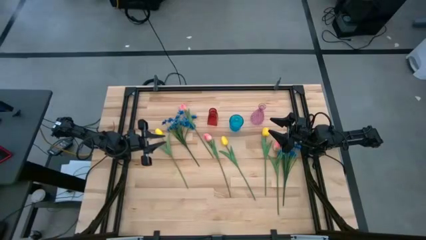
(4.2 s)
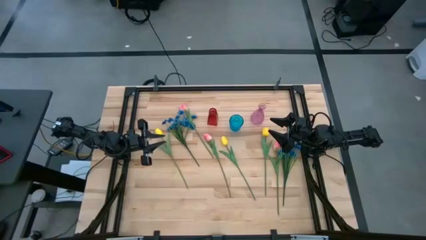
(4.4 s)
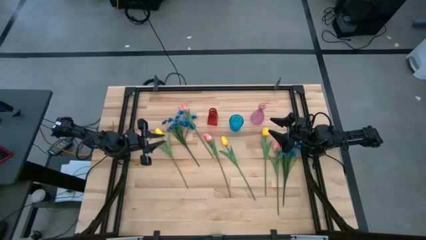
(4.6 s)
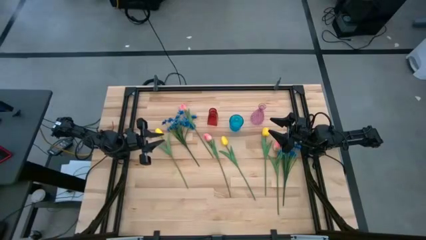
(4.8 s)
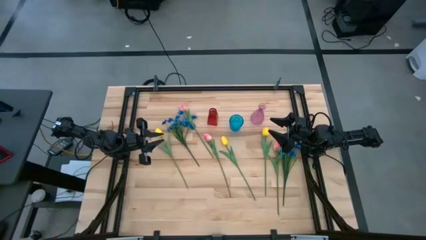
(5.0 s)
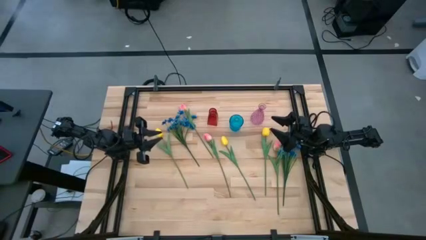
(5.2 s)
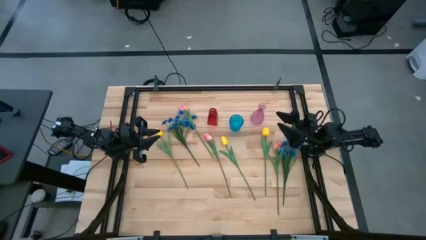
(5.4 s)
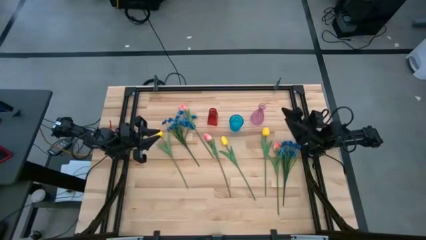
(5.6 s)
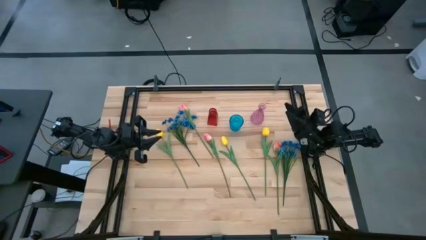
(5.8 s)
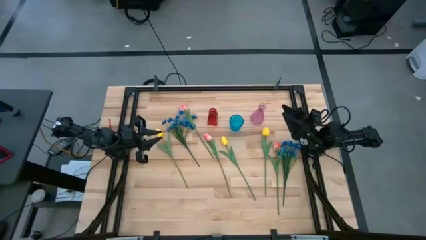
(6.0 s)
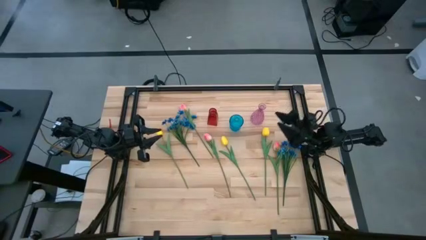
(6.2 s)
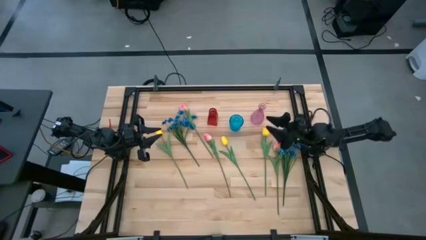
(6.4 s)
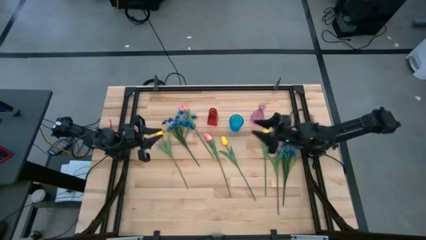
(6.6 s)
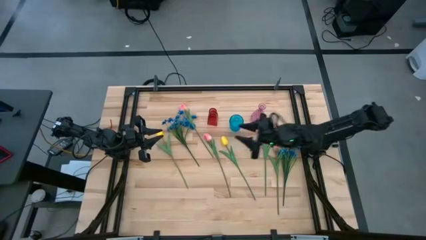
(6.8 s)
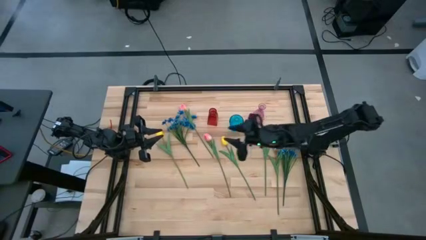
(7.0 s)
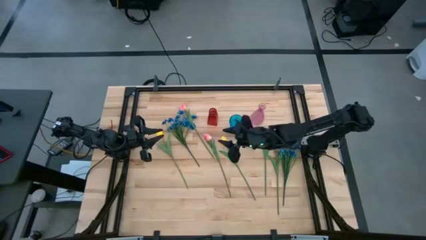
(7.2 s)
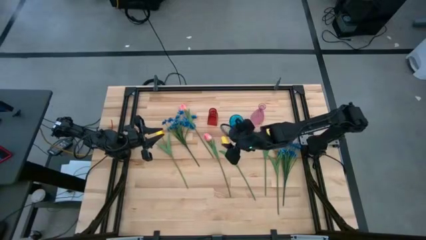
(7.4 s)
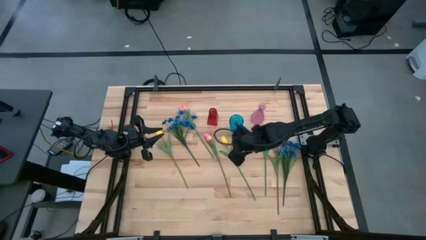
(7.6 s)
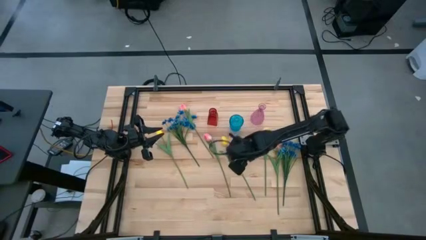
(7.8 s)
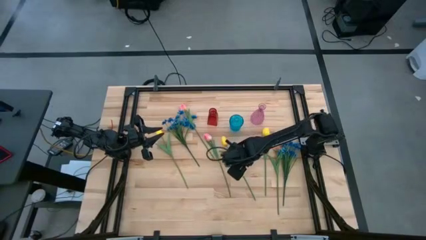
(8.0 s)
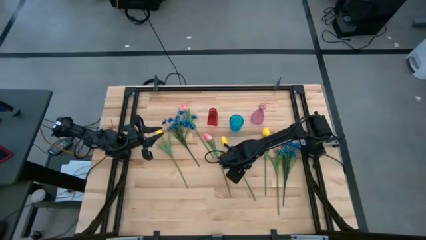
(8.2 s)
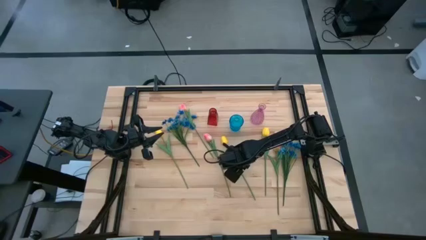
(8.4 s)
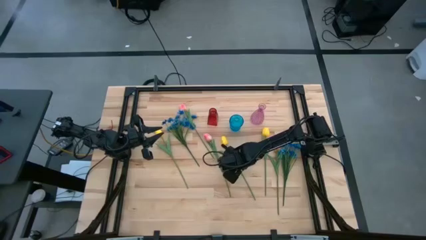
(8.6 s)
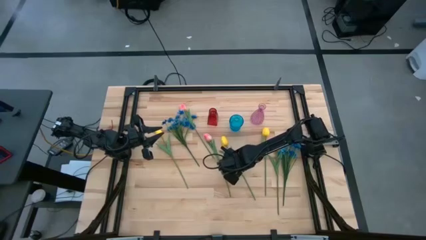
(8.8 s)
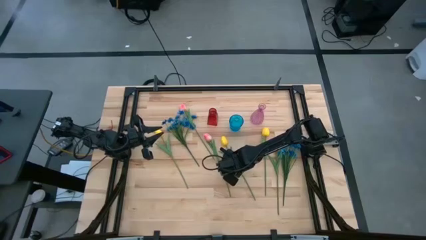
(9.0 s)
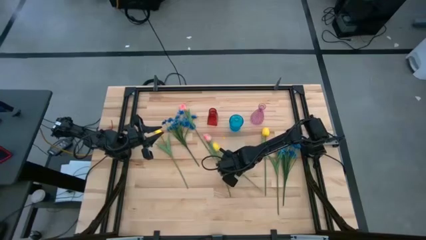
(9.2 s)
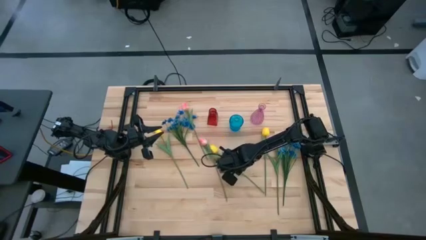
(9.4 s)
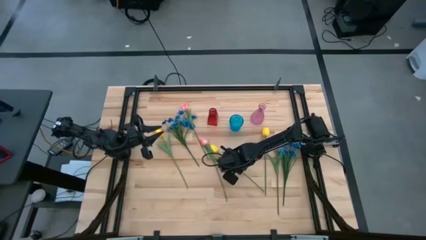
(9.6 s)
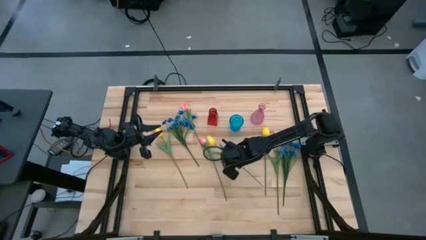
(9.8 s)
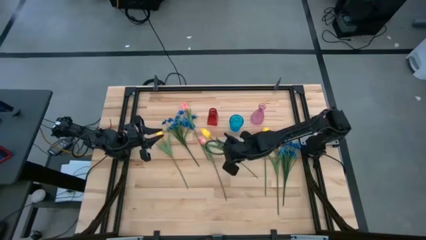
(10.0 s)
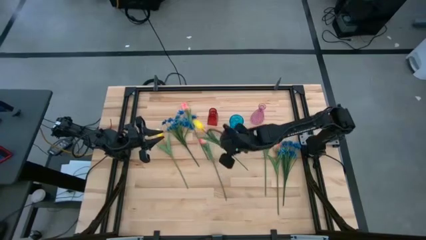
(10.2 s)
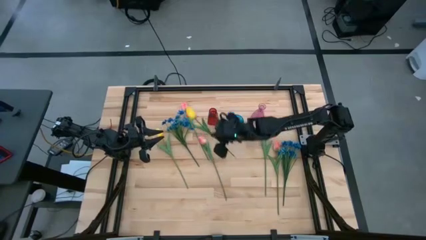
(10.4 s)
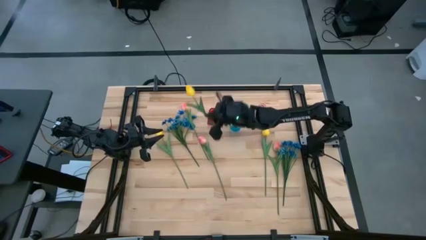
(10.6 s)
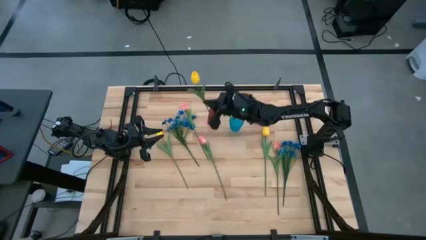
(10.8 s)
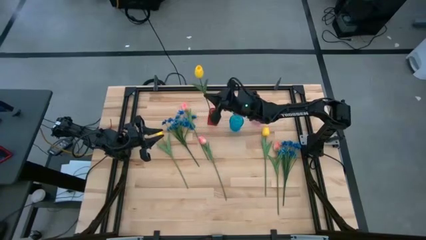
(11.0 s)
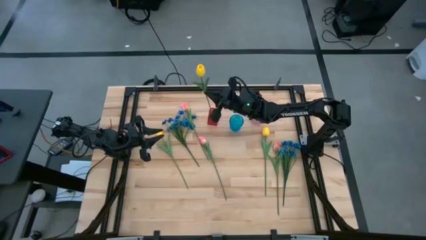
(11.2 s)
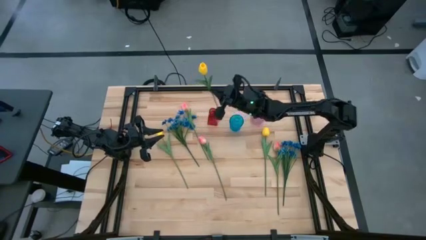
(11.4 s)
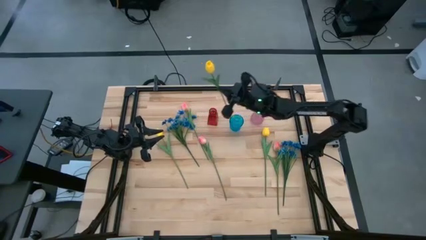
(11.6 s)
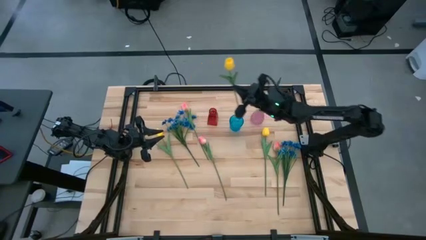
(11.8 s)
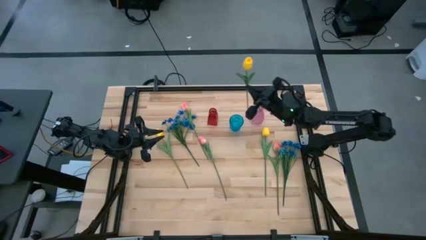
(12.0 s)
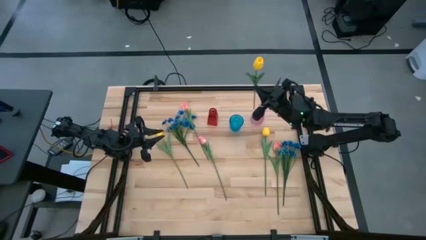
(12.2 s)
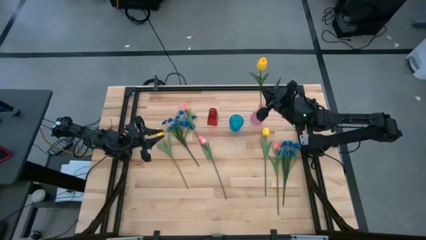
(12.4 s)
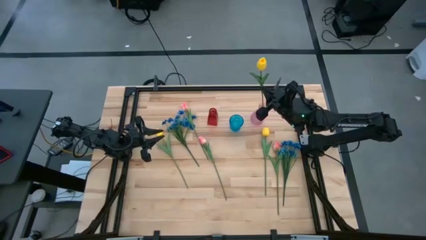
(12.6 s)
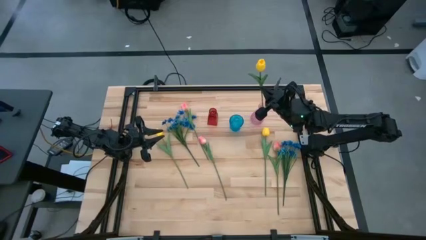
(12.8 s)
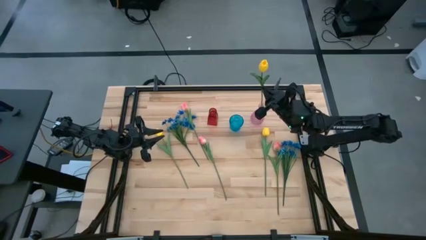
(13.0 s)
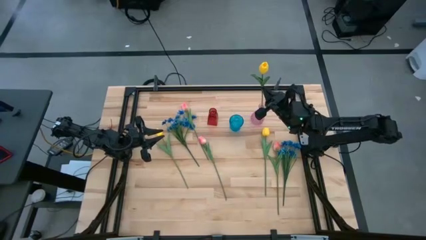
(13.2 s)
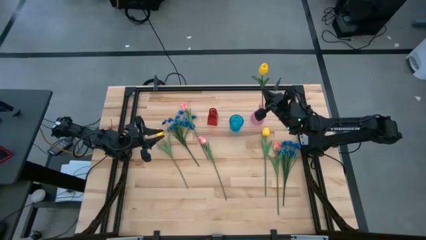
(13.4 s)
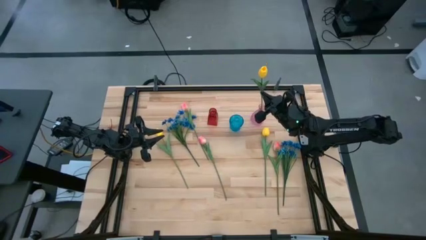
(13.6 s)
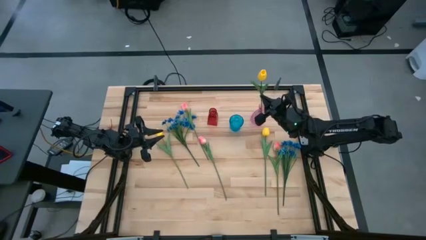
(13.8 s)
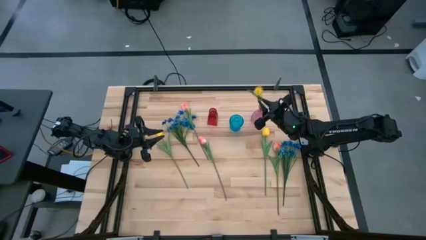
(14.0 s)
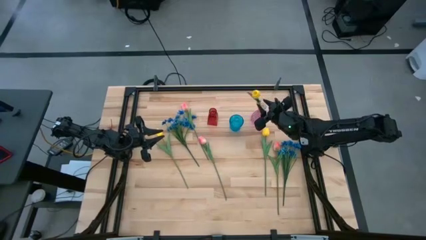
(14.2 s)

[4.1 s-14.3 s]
Task: Sort flowers into vase by color
Put the middle yellow tulip into the pink vase

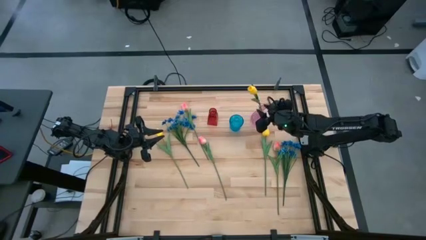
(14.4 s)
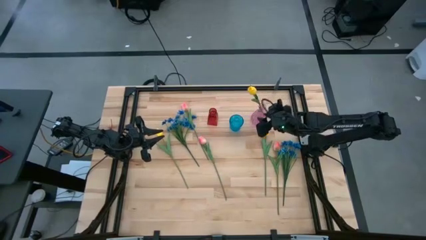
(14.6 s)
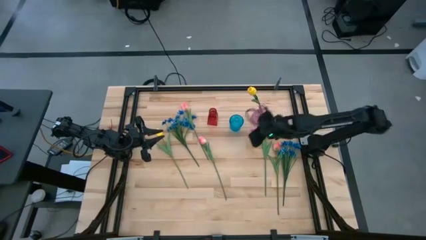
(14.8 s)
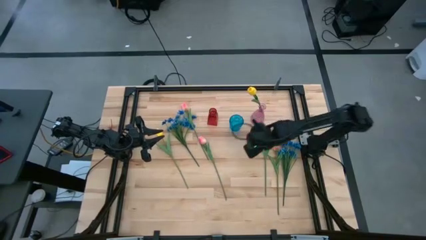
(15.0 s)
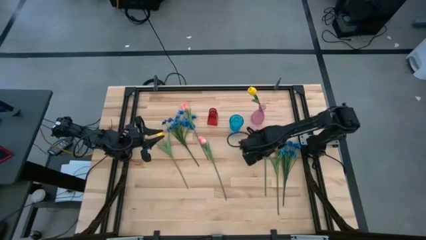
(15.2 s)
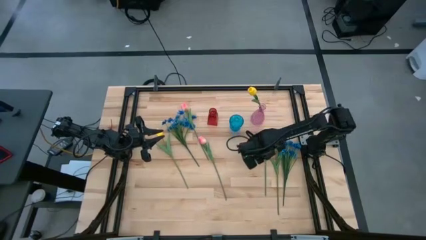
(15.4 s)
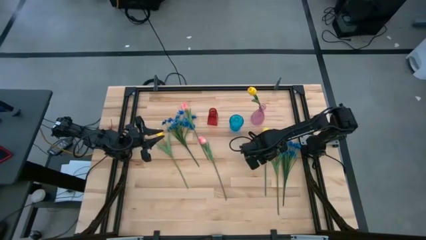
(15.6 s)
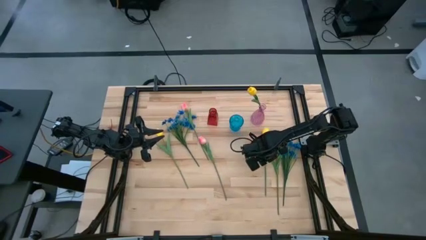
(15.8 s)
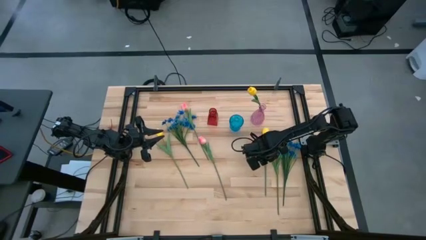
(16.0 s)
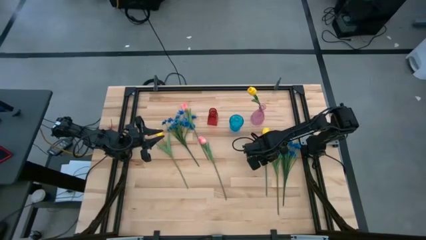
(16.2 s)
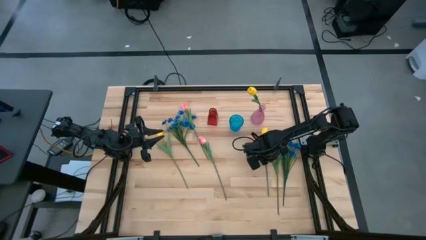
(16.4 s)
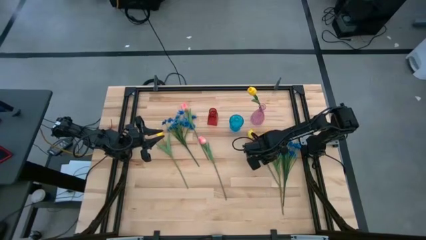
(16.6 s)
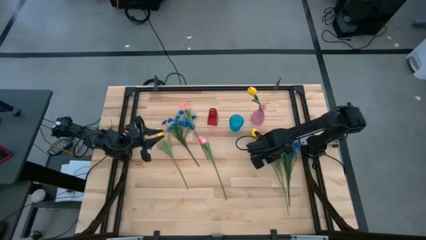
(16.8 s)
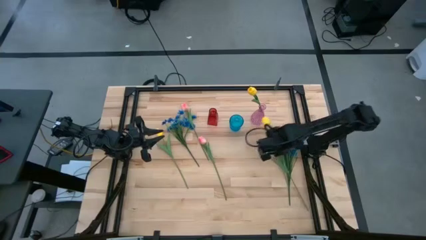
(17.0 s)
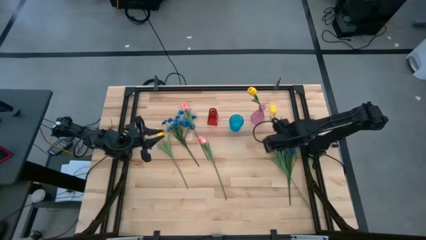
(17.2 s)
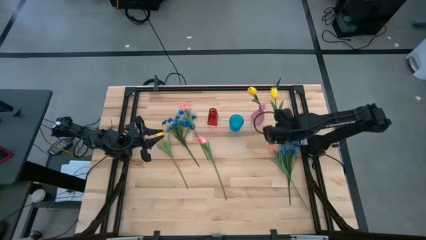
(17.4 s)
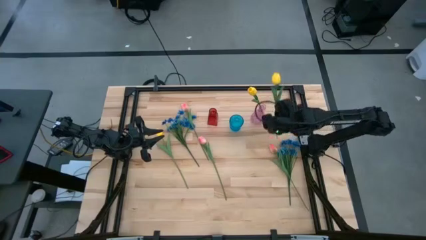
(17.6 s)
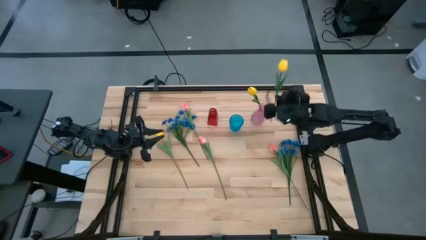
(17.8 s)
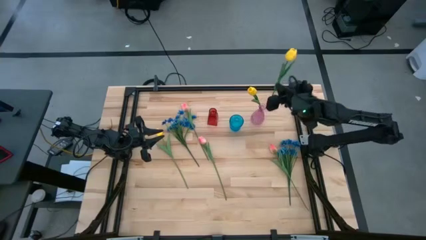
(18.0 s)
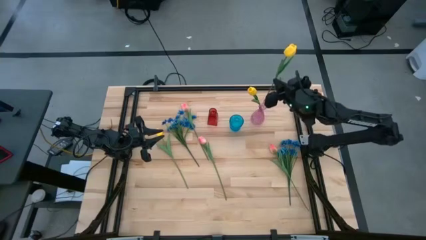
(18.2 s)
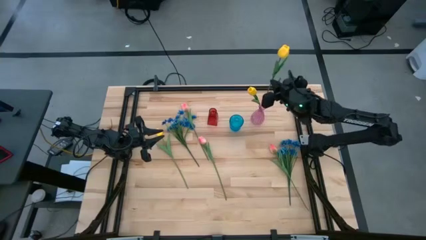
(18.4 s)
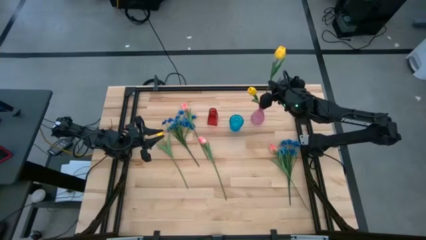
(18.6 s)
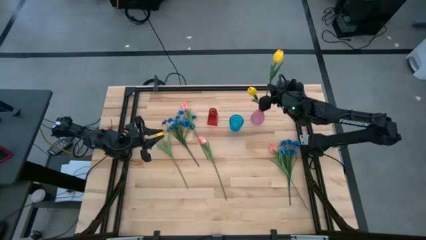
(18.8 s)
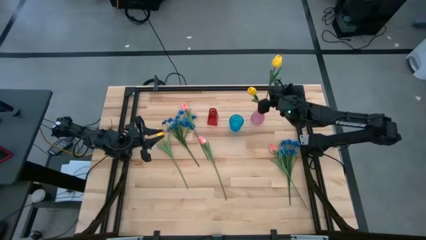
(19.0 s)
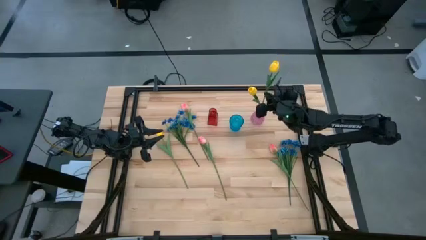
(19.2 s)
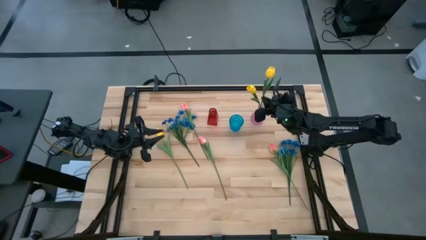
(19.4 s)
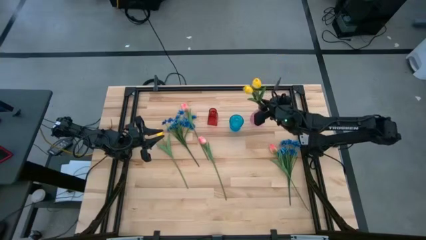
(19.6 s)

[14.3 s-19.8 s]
Put the right yellow tulip into the pink vase

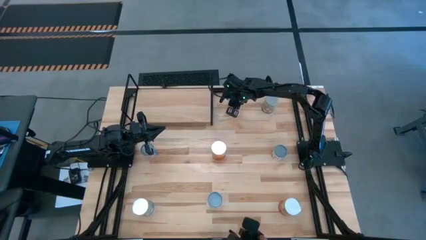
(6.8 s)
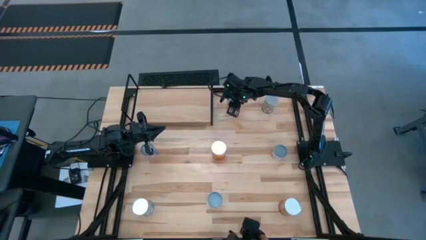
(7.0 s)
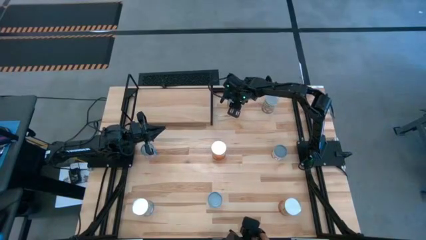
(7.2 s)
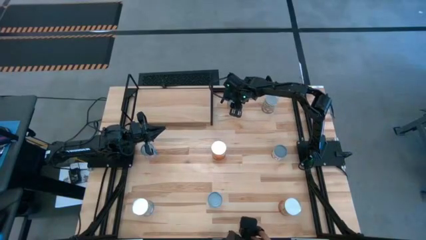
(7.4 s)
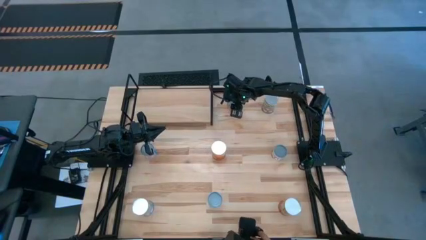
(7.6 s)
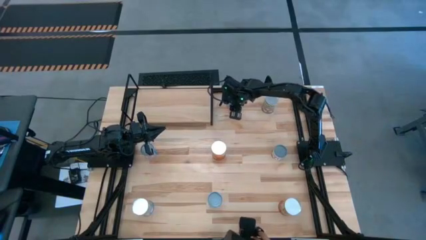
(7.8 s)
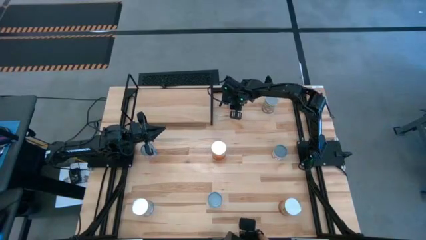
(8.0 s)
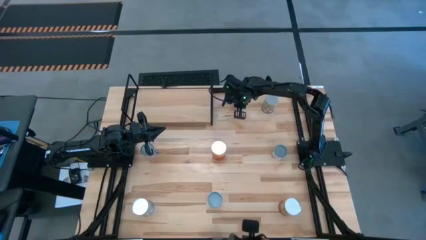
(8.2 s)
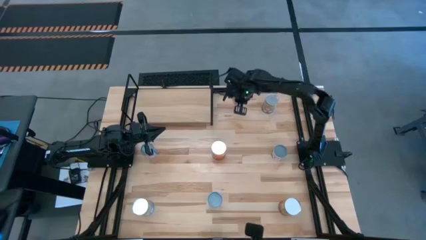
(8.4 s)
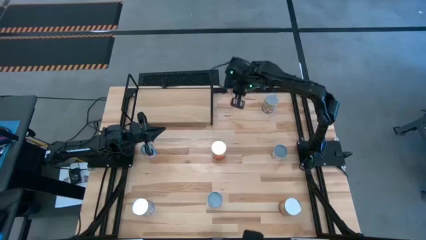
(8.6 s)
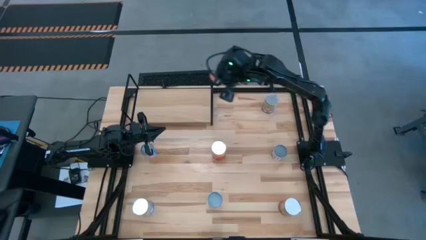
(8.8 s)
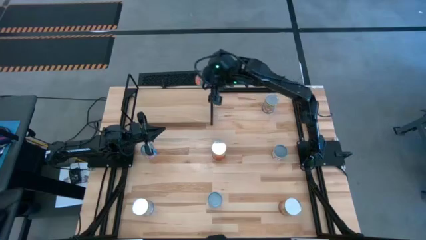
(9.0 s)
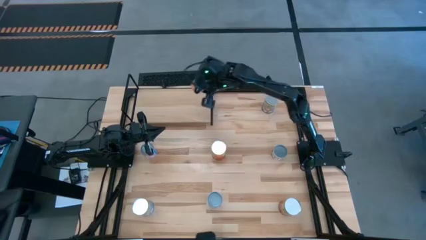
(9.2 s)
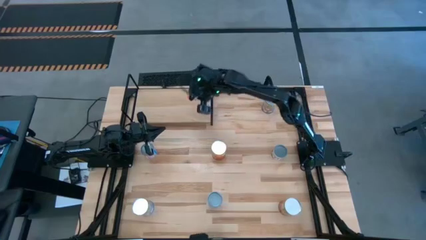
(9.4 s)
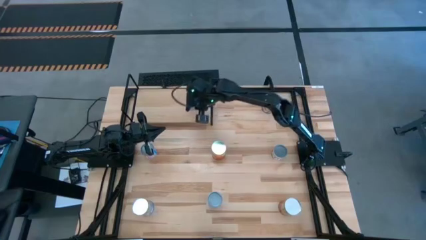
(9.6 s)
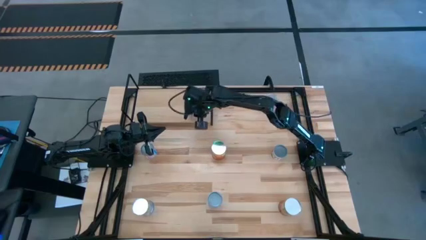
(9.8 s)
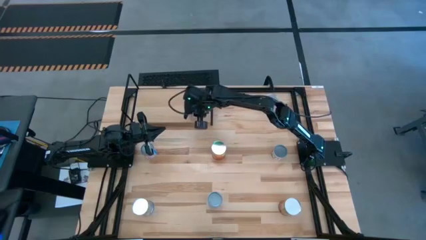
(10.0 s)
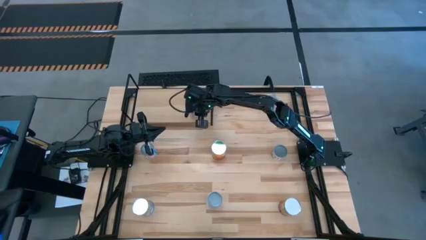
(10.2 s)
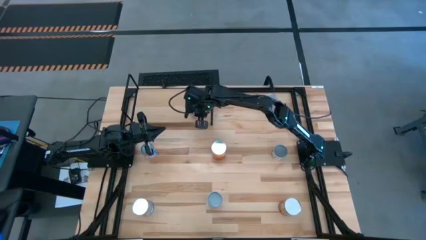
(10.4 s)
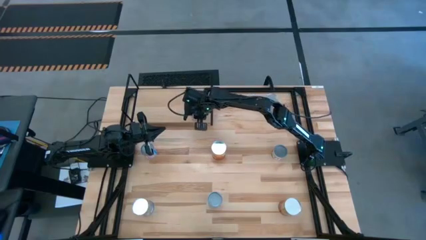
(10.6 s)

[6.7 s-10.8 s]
Task: Pick and place cans onto a shelf
Put the canned oranges on the shelf
